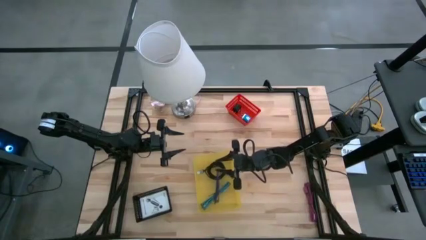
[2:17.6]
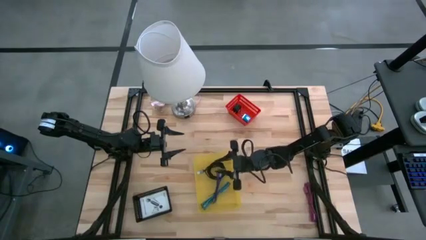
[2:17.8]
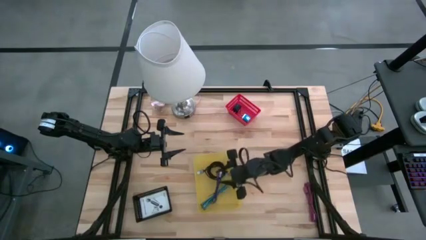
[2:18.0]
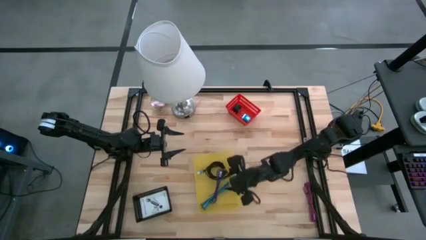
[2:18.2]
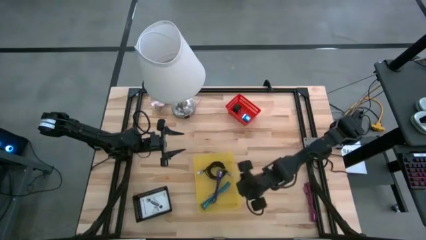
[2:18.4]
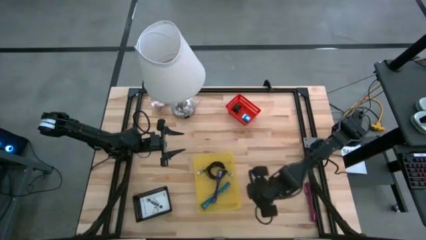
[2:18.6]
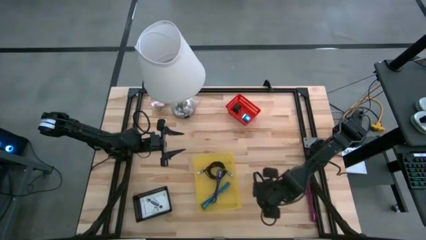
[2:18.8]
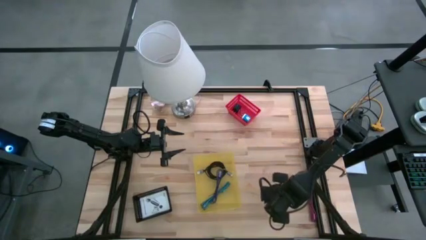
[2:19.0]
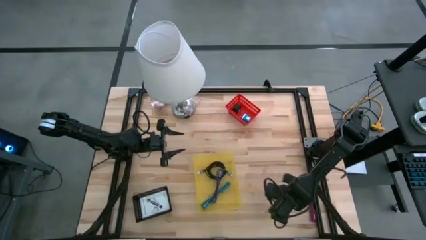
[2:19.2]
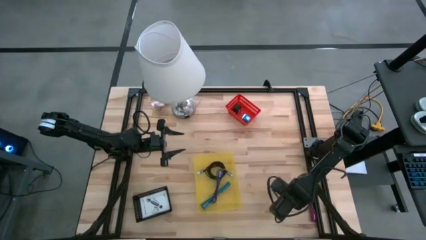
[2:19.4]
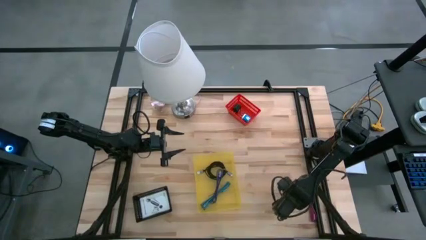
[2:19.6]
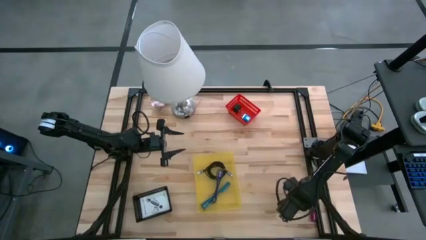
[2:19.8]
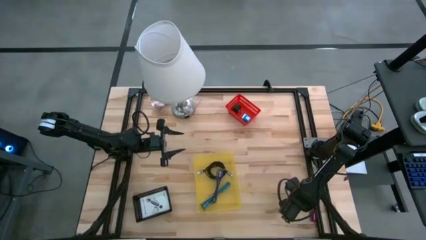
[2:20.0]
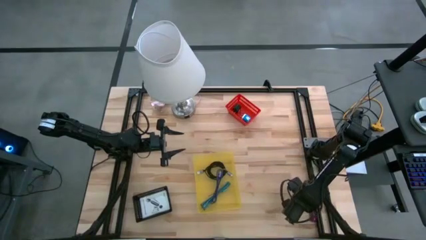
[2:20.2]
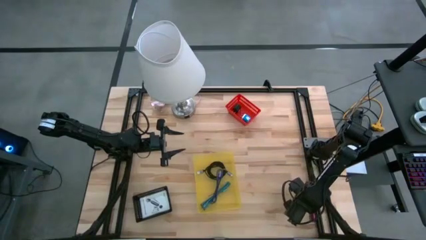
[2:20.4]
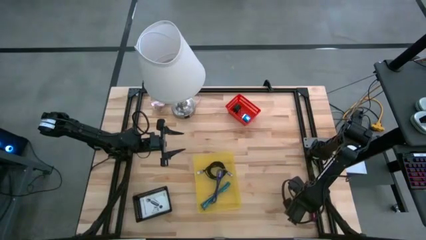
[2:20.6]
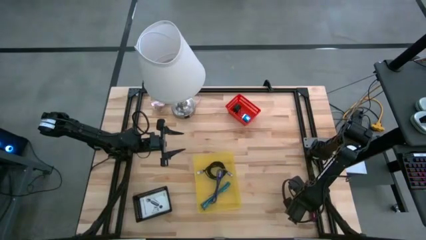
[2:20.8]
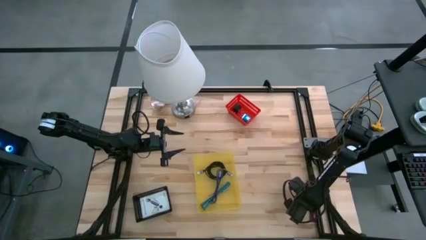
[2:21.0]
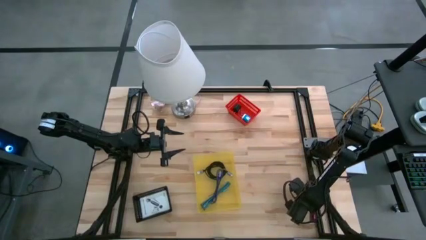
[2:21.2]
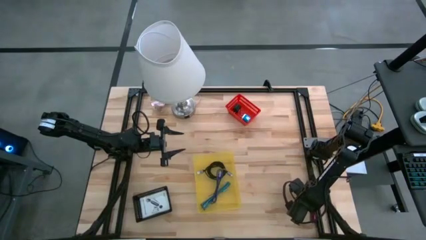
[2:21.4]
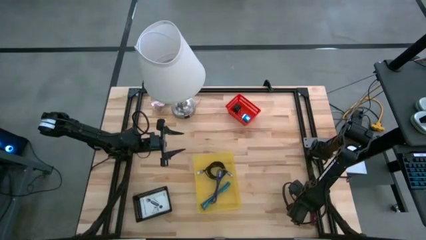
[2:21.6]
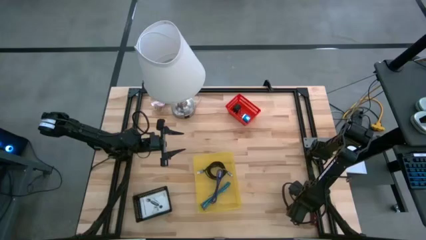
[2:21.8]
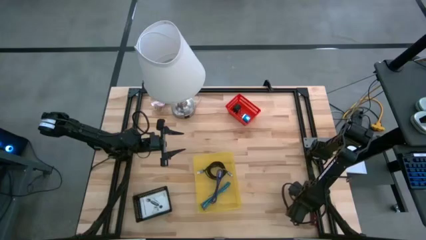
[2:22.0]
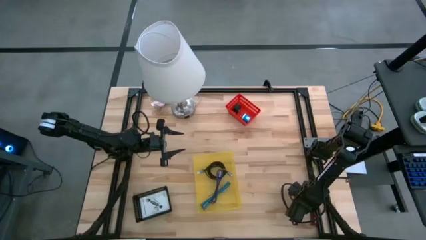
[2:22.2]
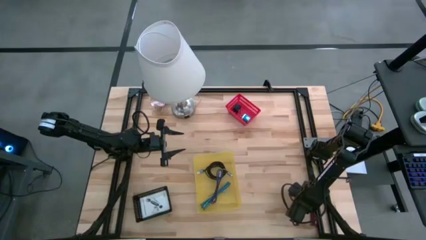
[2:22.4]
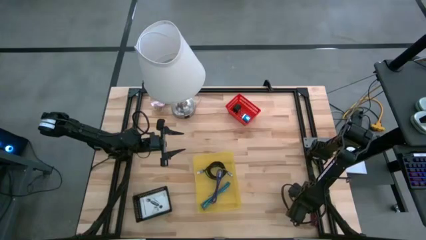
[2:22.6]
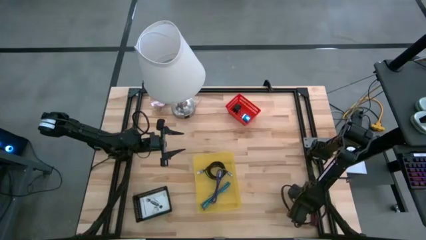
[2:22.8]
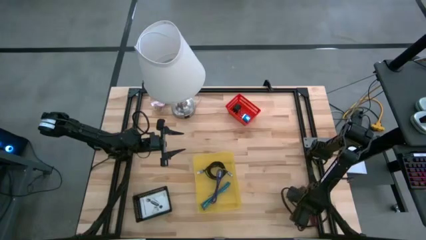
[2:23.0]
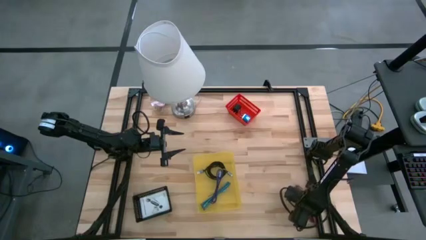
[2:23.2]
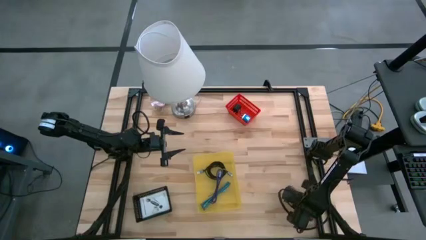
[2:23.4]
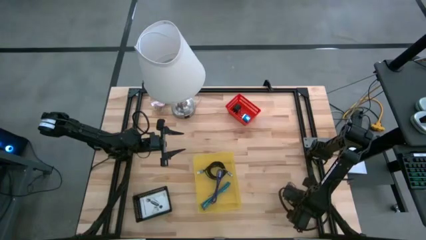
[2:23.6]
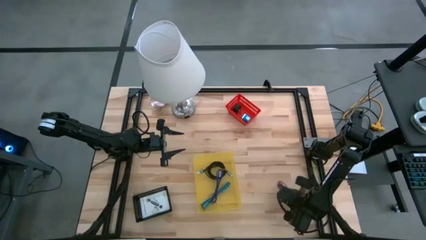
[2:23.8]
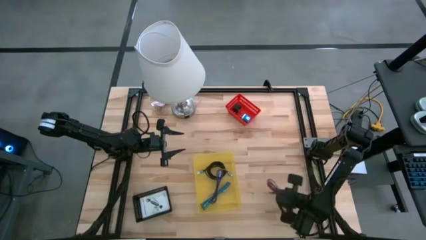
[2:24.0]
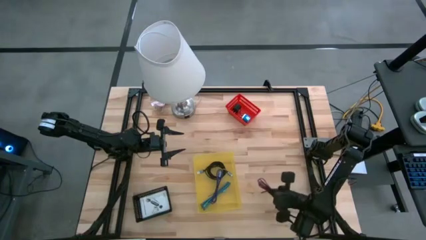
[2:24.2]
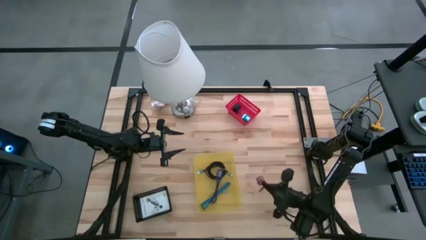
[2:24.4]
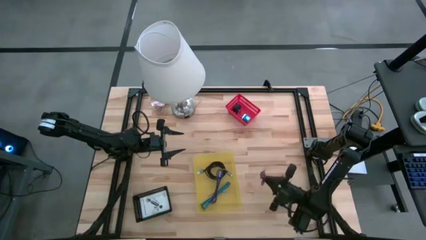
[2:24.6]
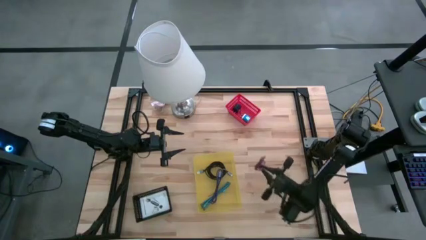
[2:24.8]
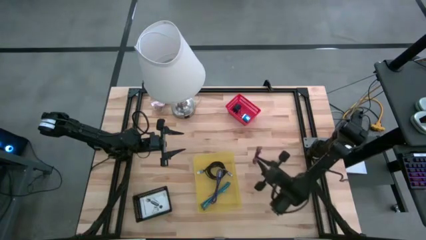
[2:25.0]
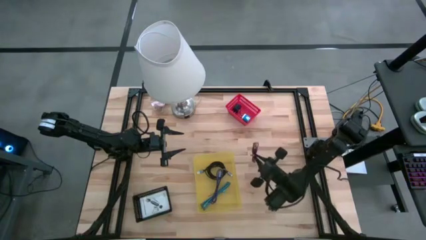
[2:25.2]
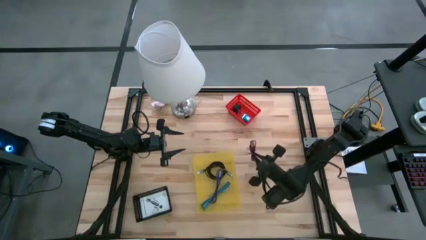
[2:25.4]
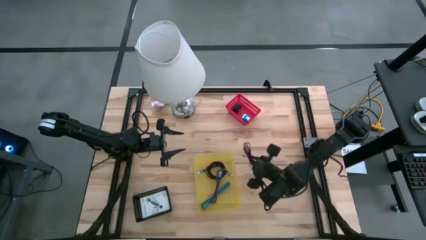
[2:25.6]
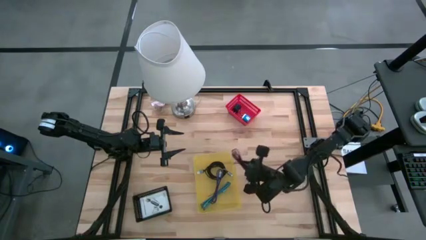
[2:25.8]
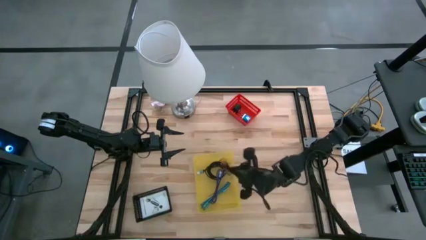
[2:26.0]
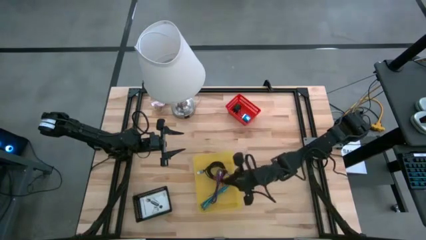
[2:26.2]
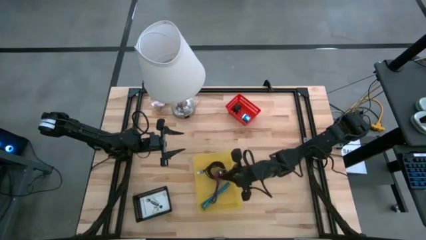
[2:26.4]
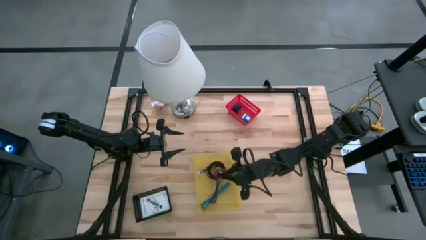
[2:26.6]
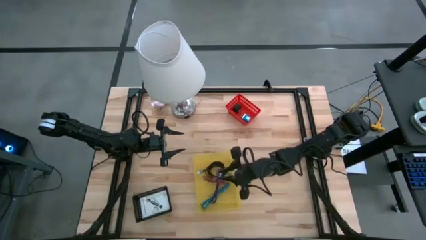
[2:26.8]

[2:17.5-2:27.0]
Task: Pick and place items into bin
Put the red charger cable into the yellow bin

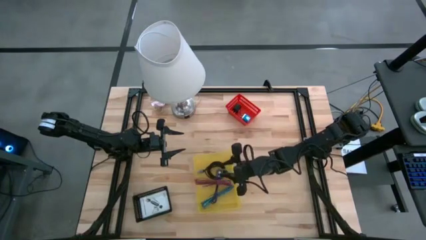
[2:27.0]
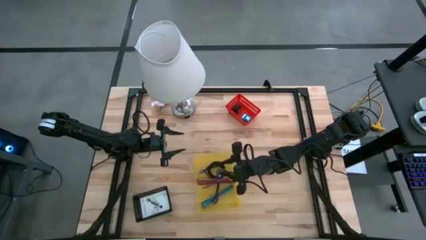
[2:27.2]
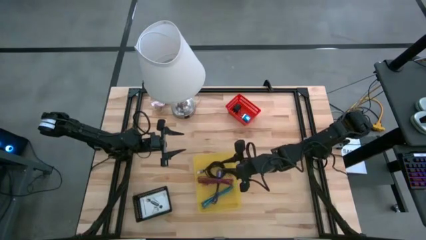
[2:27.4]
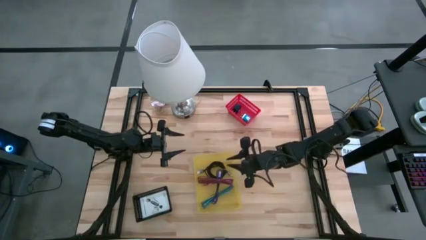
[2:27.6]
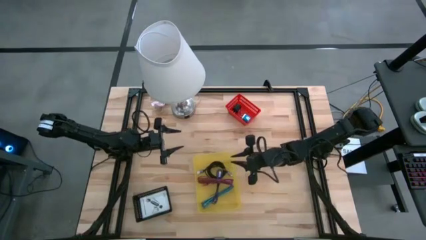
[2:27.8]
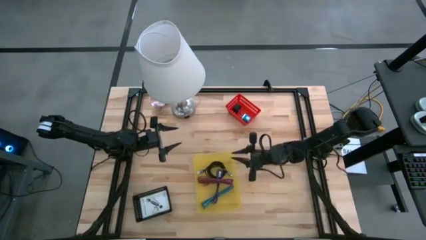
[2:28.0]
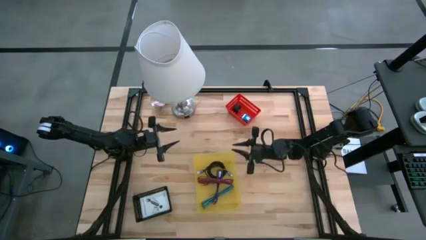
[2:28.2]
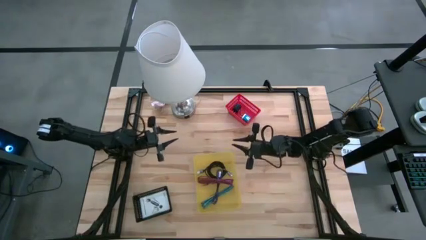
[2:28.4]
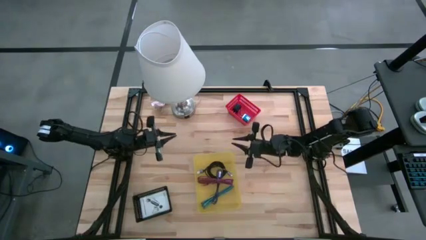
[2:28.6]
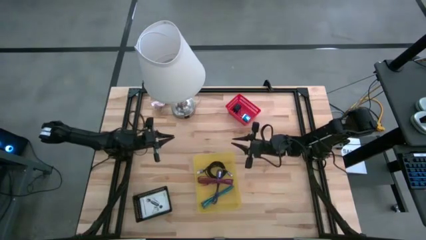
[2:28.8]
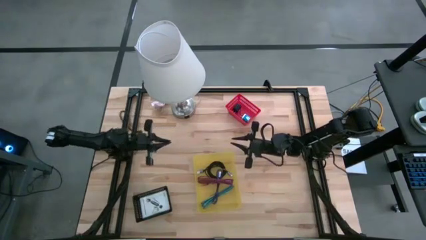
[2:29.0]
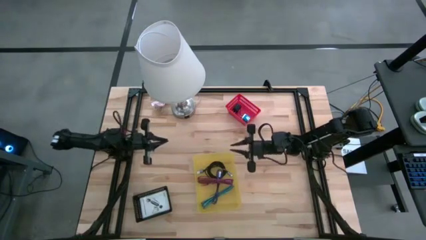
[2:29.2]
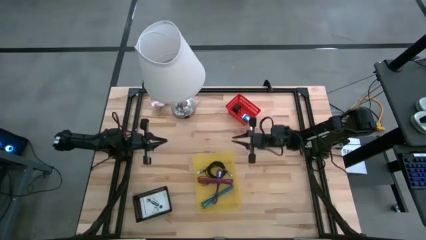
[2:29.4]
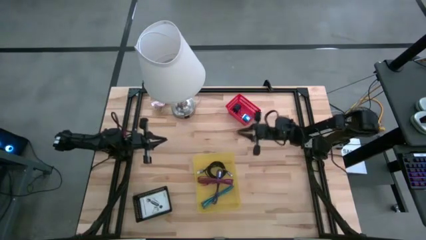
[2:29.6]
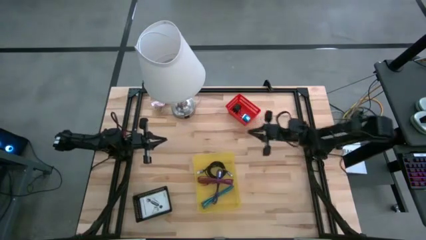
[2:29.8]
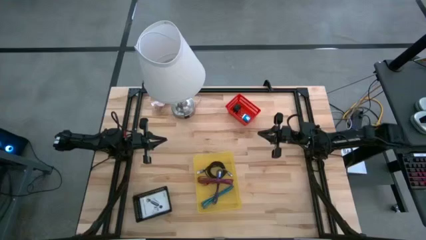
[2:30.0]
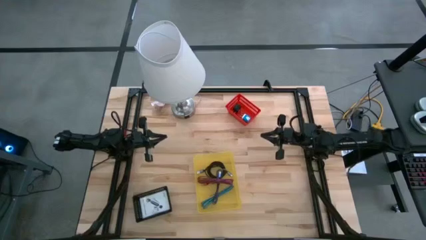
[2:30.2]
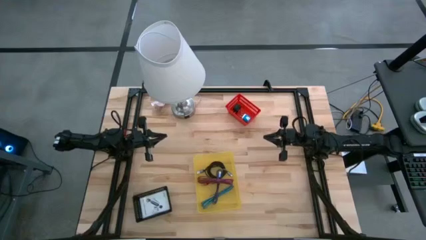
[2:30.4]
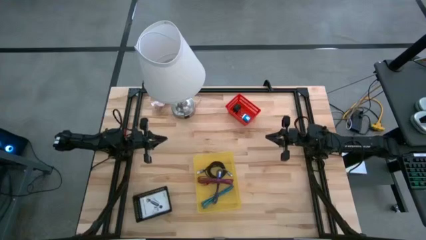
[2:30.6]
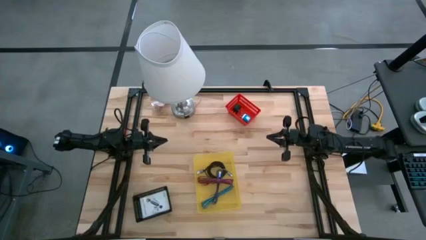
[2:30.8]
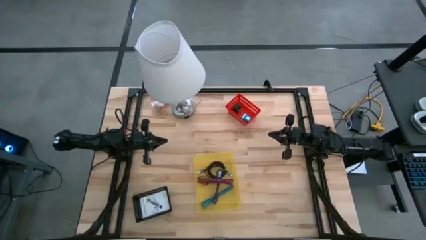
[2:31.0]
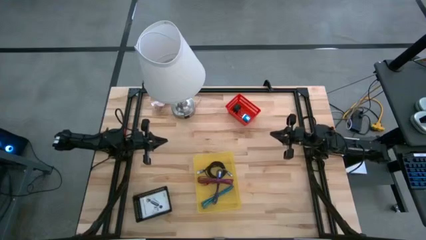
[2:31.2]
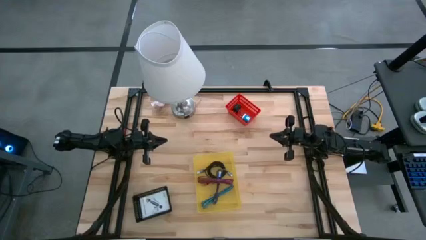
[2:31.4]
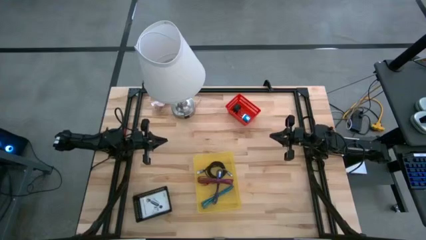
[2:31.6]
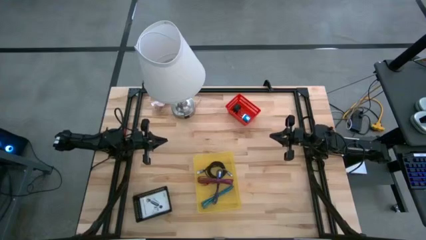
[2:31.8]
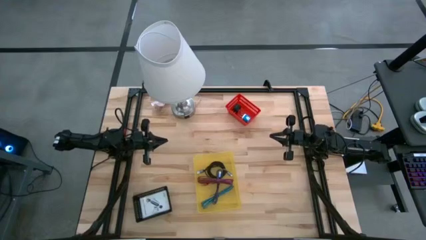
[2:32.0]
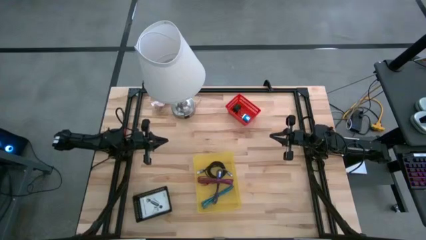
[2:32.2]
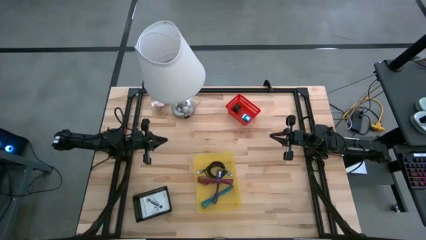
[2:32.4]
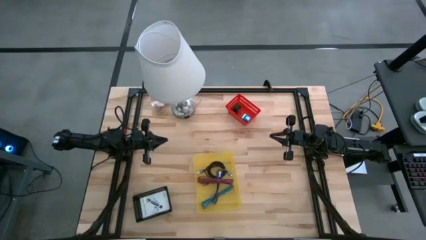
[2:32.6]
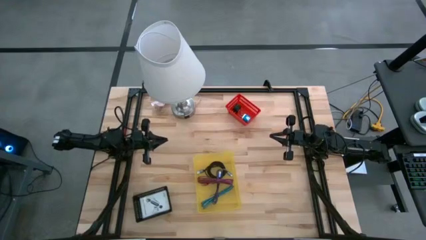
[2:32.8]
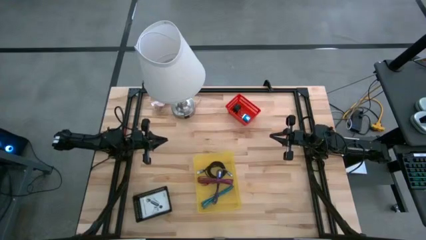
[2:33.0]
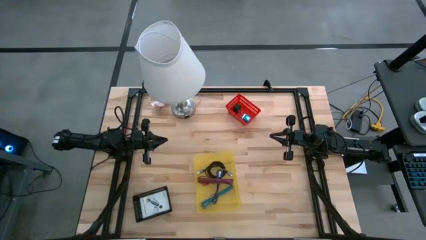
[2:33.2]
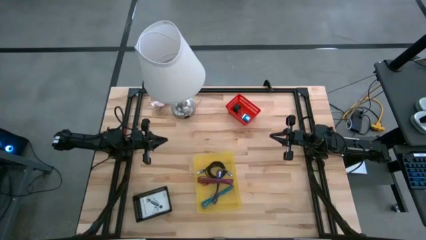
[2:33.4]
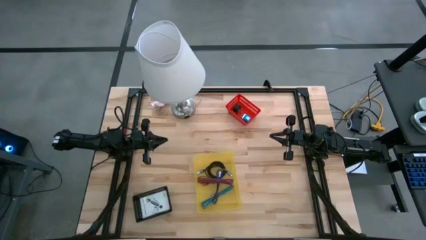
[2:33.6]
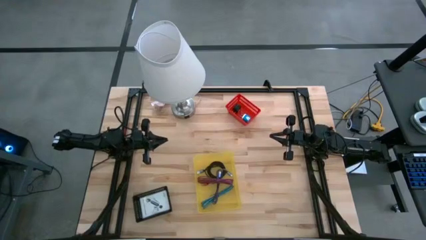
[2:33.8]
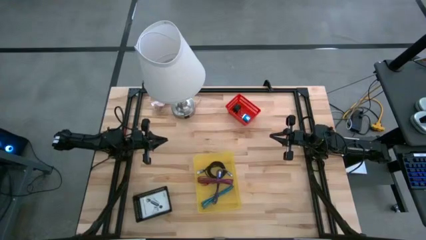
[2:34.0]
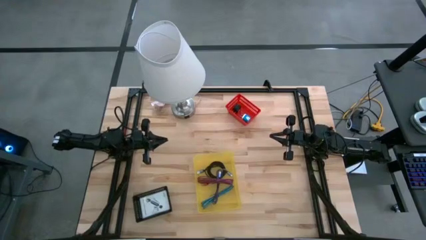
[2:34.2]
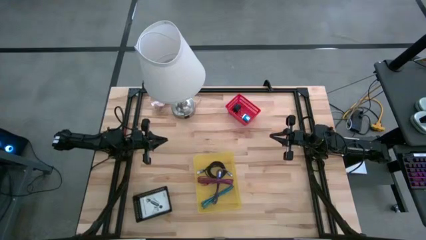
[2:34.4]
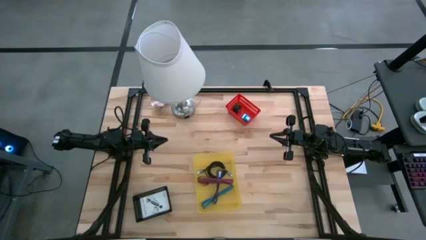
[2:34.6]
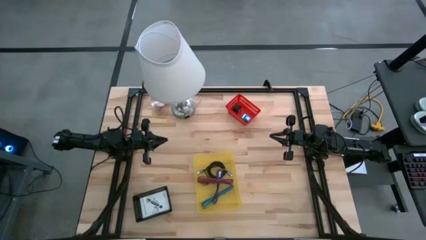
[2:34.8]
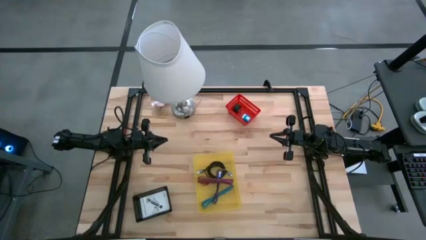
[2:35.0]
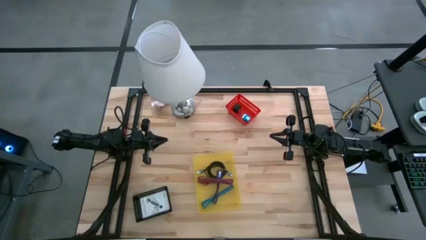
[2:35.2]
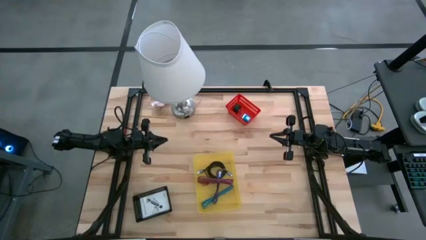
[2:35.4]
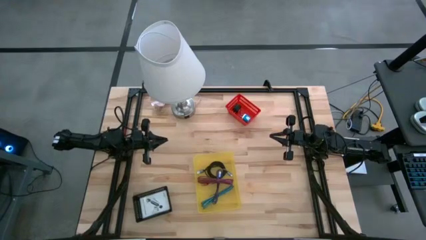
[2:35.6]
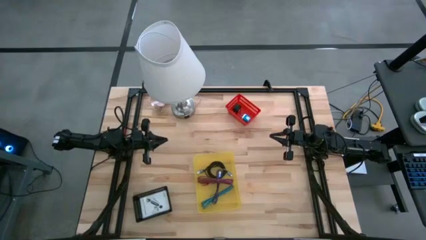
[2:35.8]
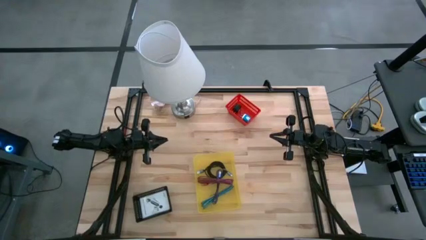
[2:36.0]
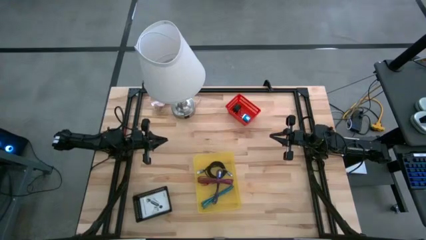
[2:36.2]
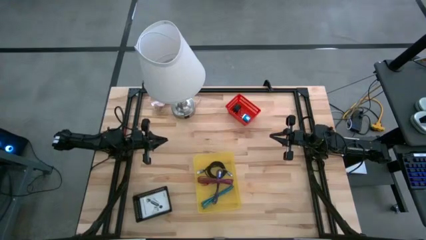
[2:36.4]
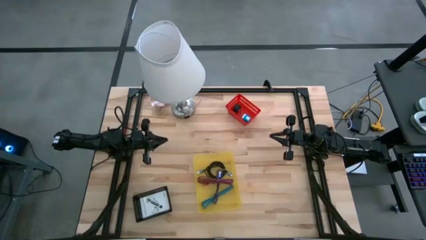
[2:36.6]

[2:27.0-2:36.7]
Return to Home Position
